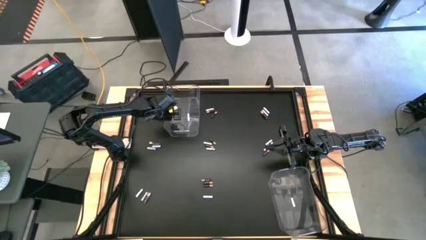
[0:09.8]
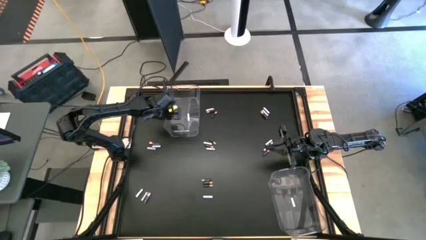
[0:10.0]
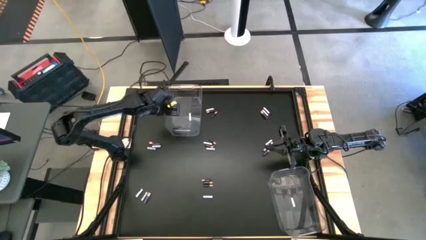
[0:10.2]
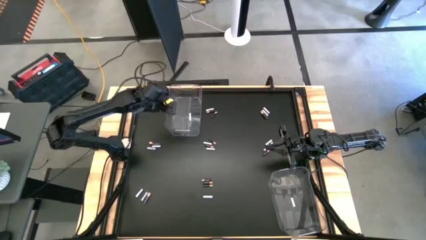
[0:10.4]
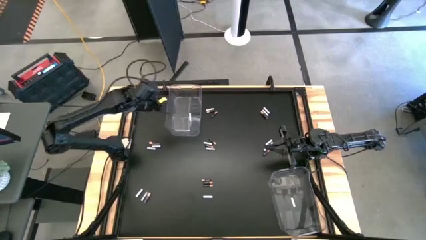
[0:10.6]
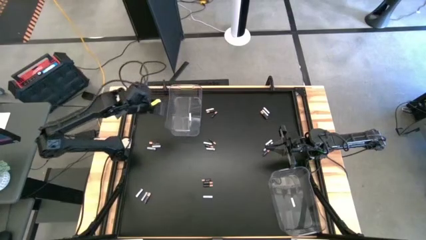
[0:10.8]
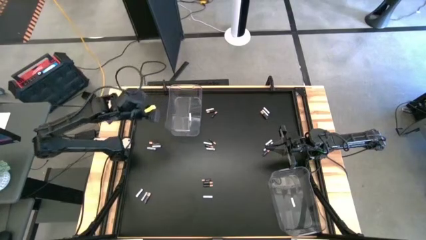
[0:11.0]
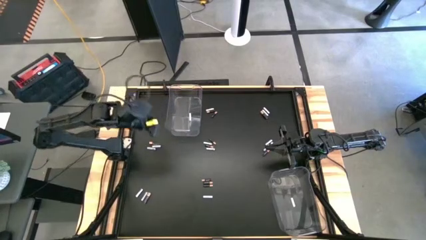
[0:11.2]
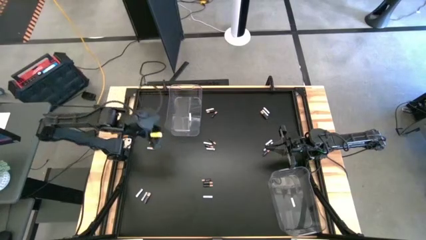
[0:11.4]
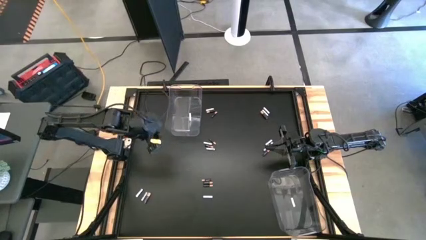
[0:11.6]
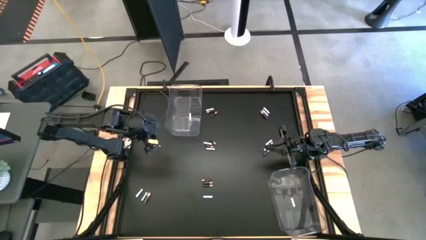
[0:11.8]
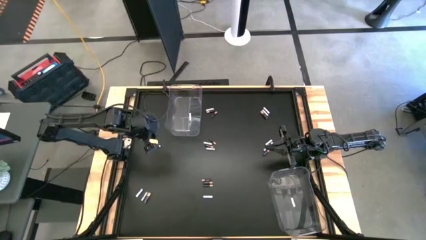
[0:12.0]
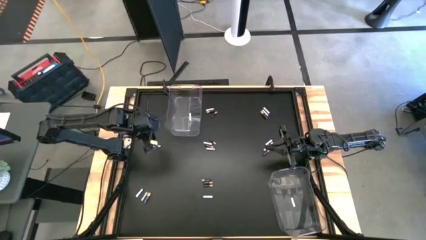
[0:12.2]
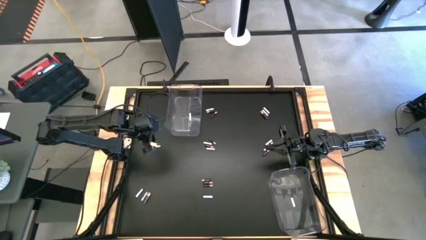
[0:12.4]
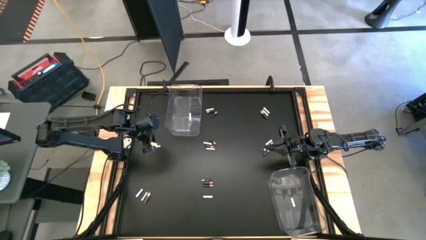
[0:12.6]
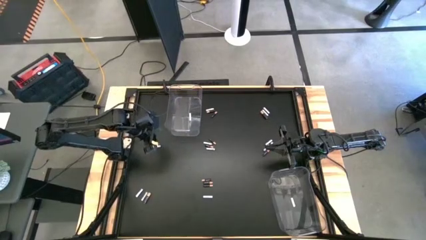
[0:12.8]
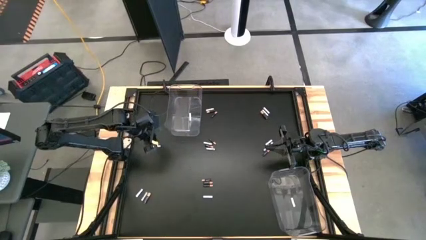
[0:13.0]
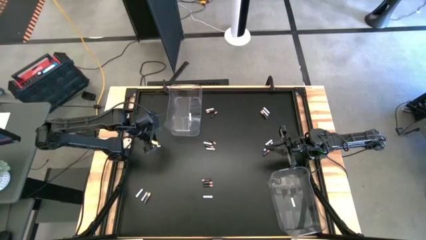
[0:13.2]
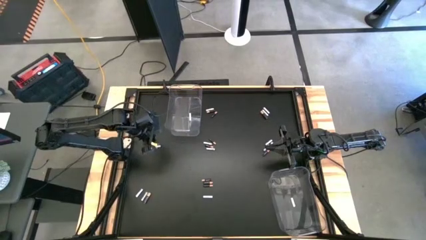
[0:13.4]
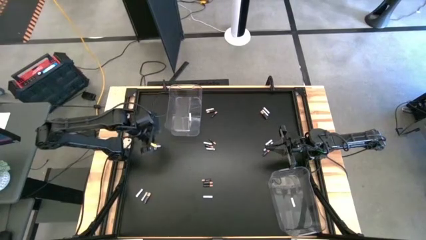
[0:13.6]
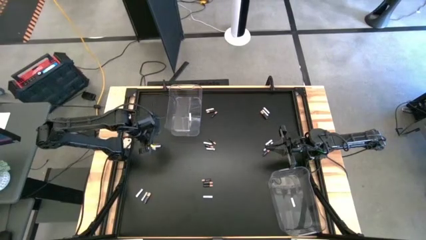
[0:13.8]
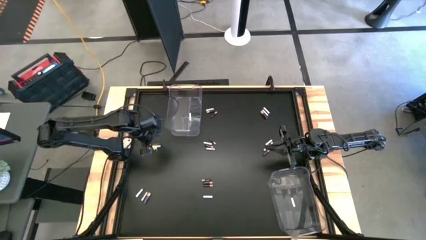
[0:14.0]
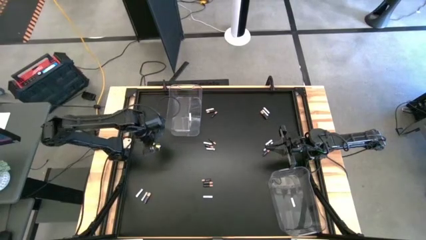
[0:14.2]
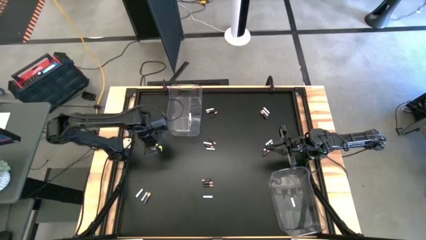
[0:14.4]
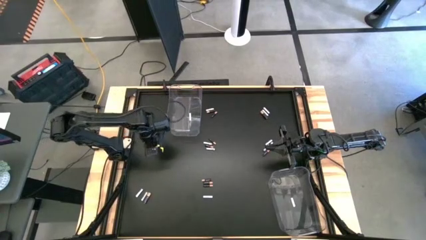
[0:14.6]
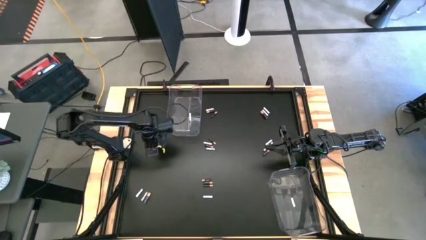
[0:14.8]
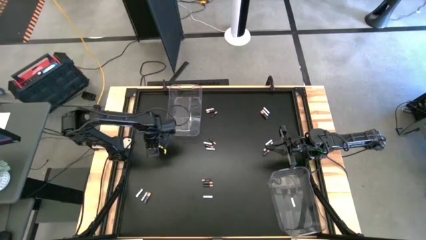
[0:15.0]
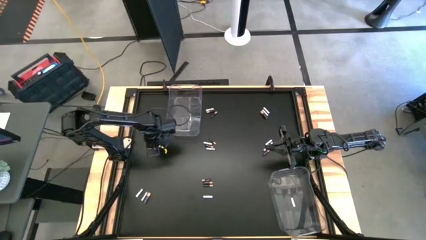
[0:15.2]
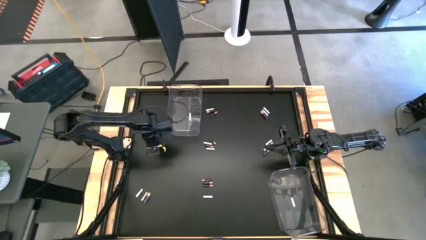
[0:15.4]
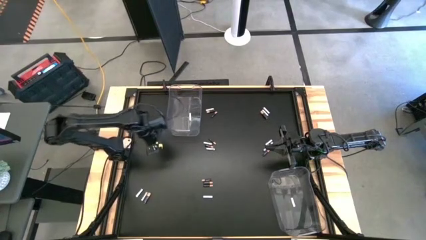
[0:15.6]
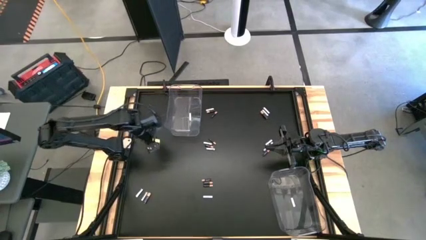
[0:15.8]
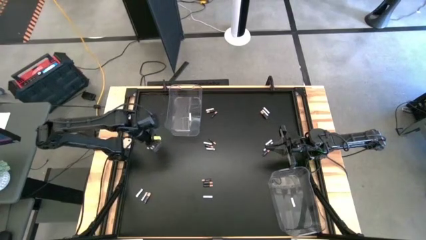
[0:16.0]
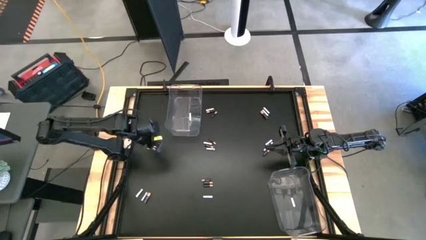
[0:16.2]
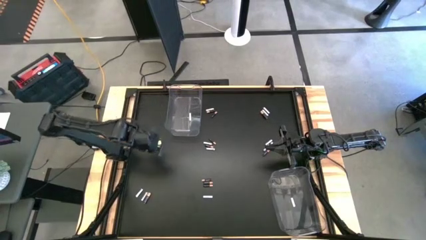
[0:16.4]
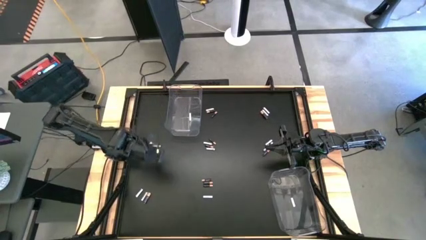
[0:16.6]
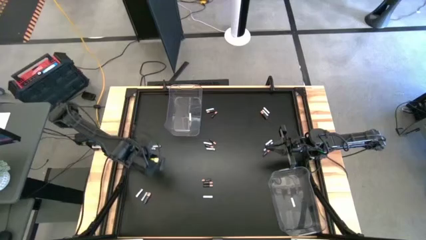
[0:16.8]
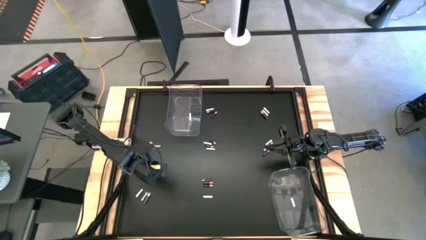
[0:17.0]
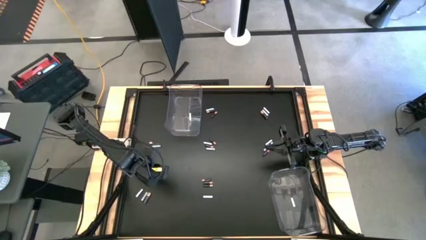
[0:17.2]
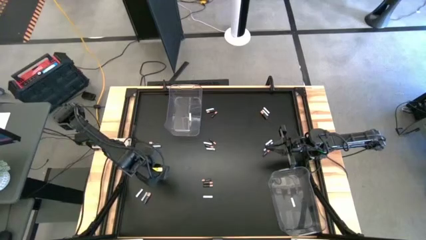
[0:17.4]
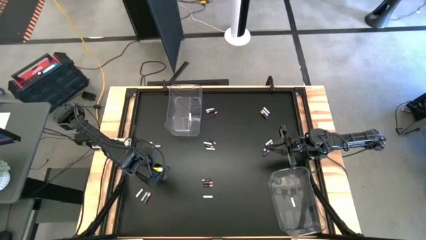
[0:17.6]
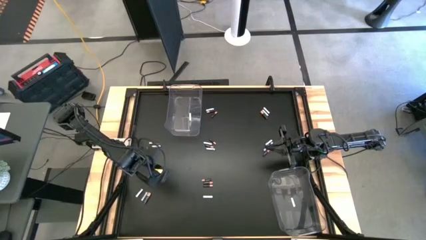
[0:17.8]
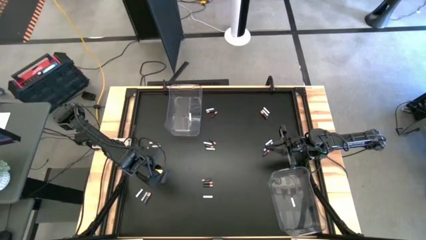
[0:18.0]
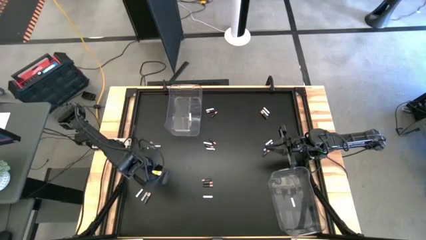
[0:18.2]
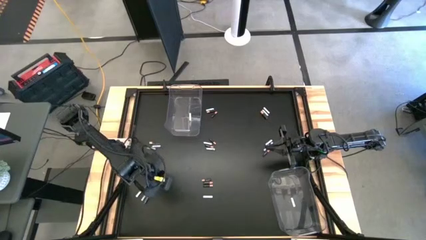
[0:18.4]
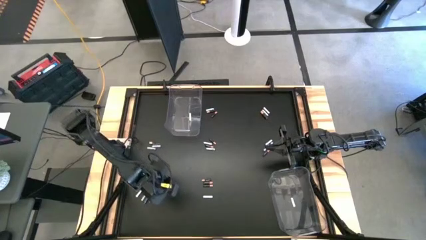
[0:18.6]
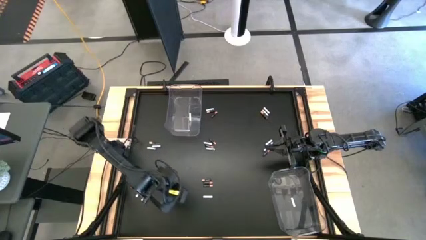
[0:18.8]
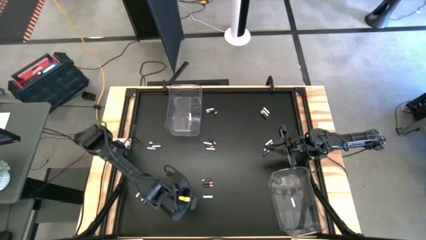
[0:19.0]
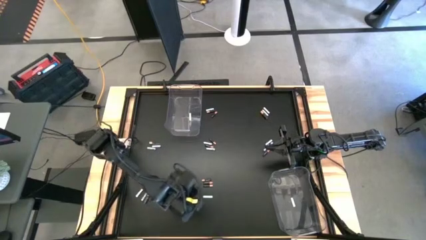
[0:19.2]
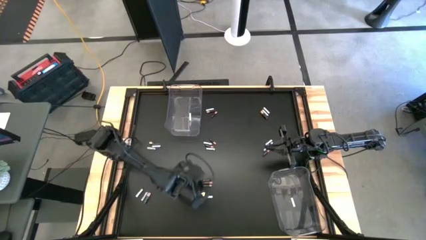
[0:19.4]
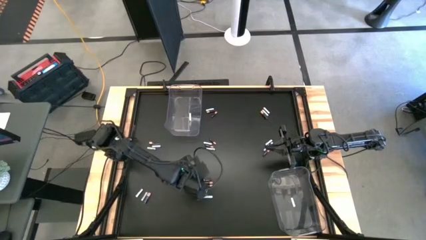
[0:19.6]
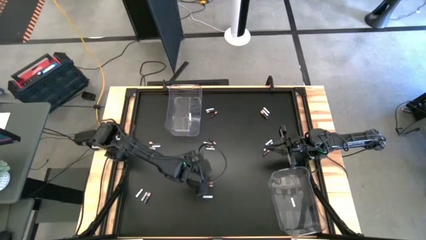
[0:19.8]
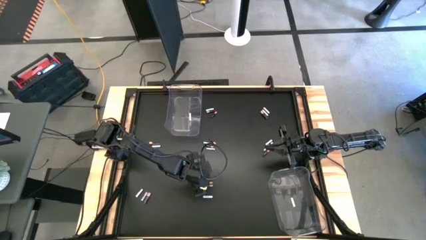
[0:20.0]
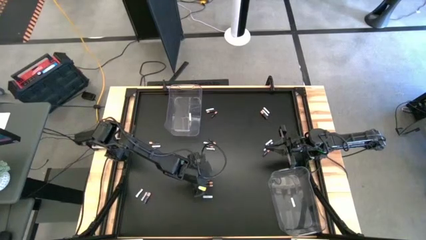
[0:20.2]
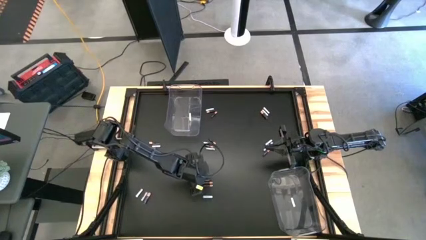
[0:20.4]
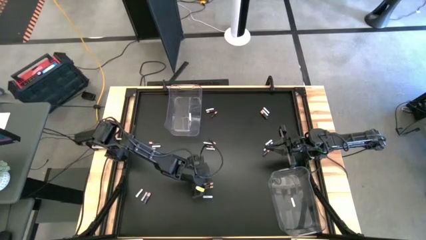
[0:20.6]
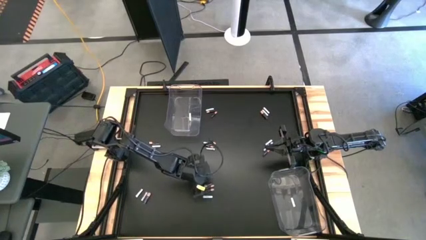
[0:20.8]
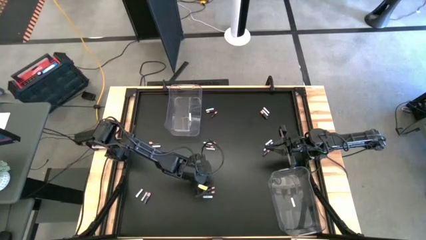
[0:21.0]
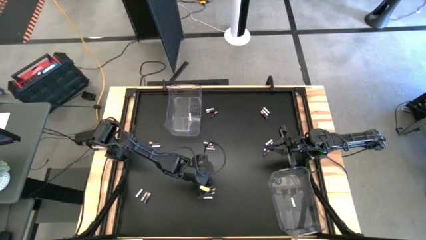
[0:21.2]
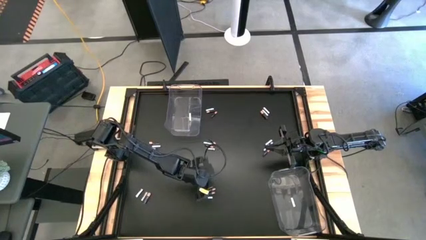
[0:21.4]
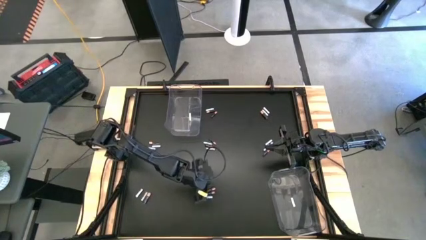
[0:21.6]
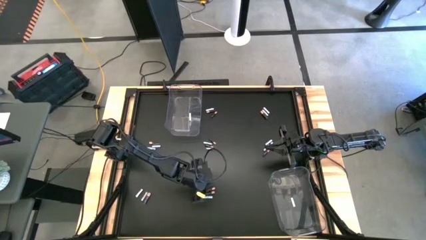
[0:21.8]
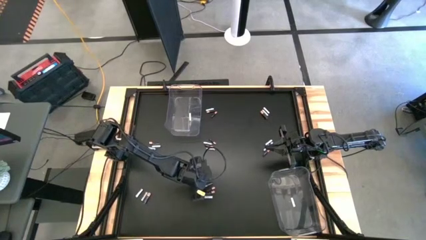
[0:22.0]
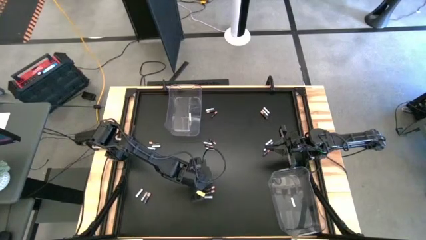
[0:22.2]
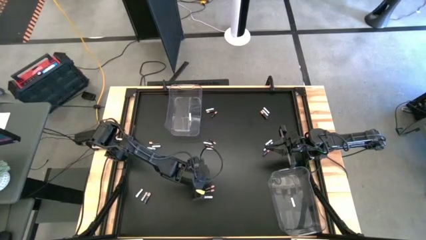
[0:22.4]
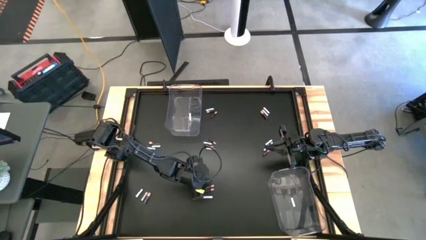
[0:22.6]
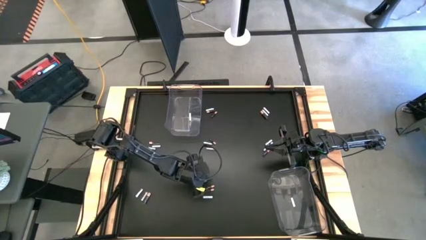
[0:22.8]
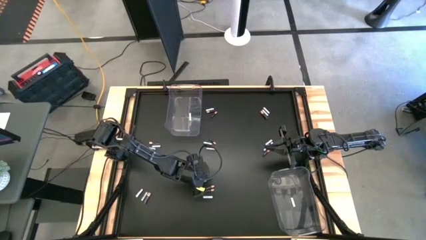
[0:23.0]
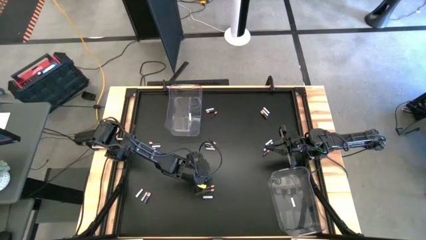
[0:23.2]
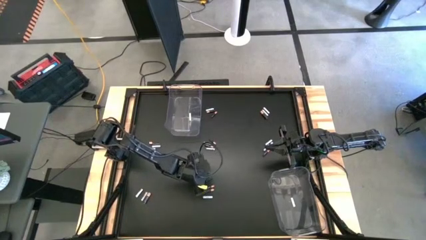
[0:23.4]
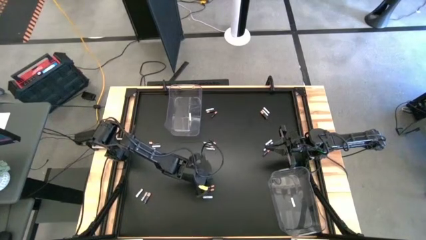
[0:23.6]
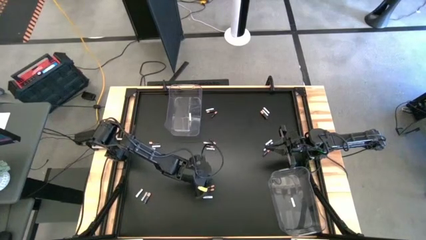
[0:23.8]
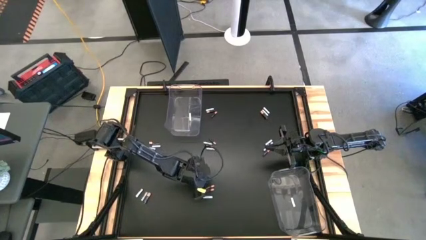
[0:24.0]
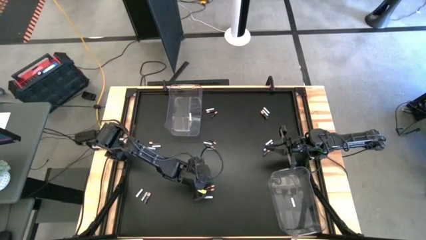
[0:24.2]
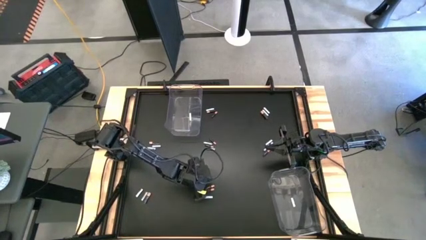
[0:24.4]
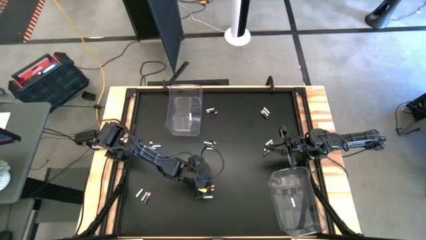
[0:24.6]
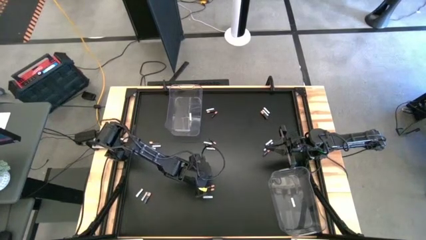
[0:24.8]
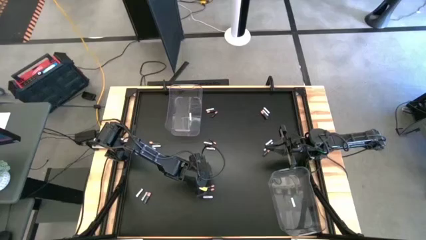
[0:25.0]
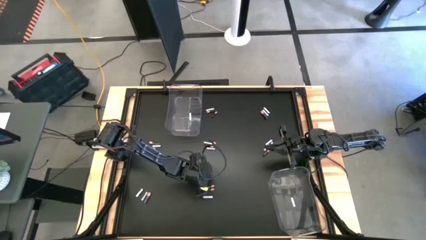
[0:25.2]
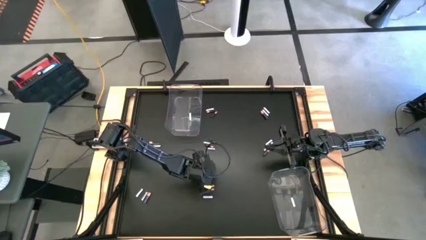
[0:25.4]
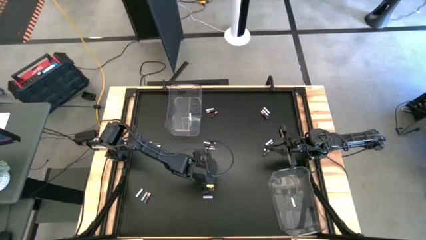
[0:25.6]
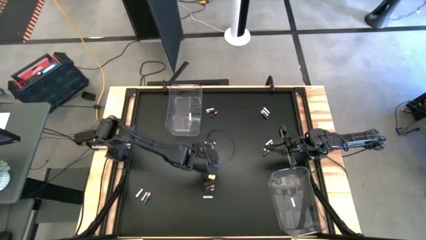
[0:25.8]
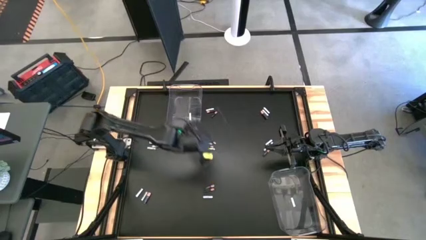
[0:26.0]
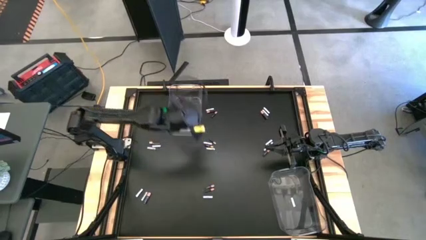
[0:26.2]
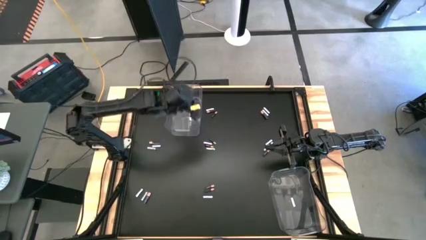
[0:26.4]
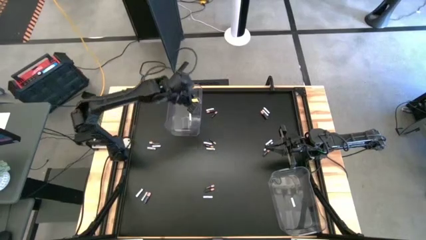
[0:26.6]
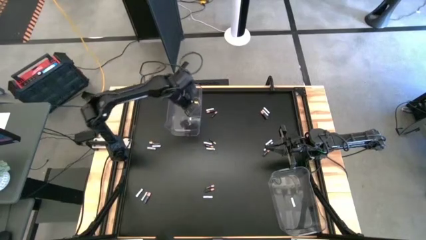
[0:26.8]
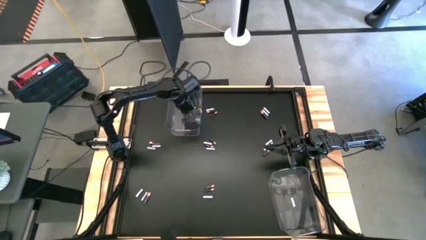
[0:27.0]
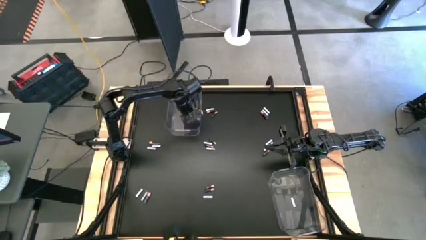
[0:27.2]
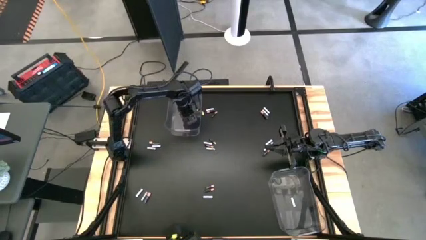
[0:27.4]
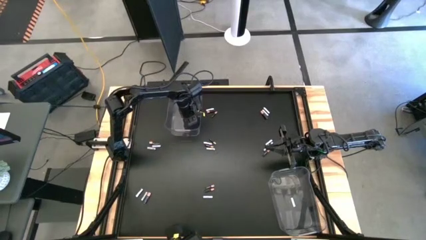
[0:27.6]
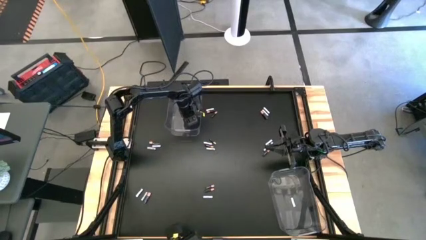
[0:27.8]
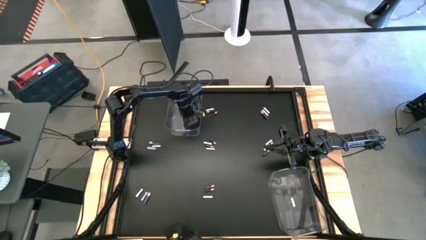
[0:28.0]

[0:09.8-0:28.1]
Task: Sort batteries
Put the black battery into the top transparent bin
